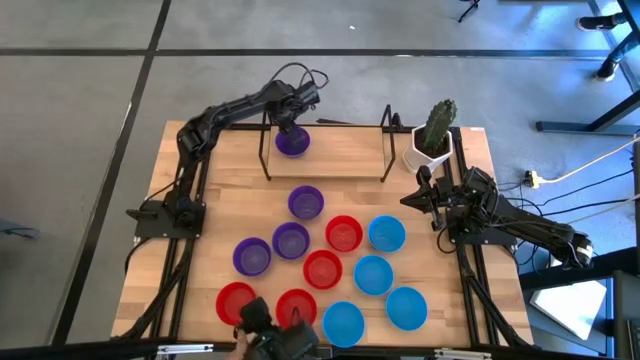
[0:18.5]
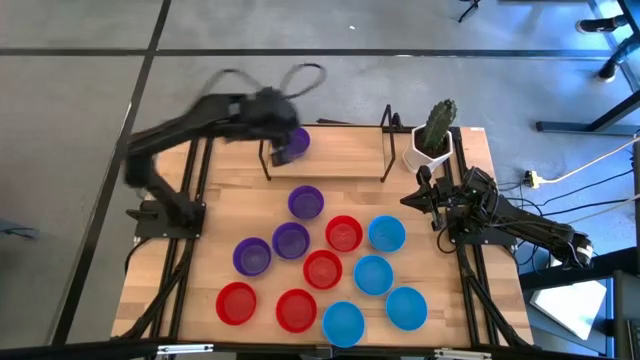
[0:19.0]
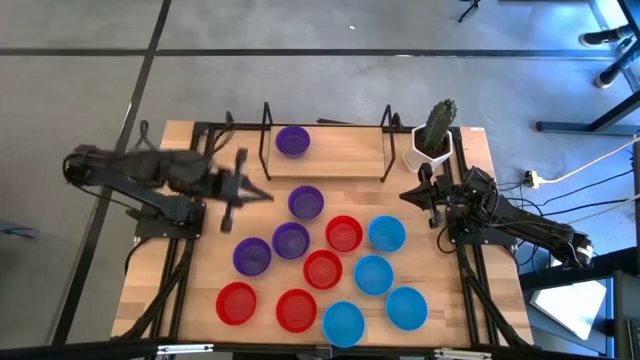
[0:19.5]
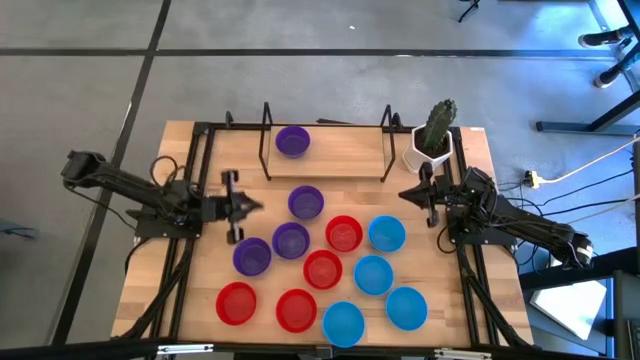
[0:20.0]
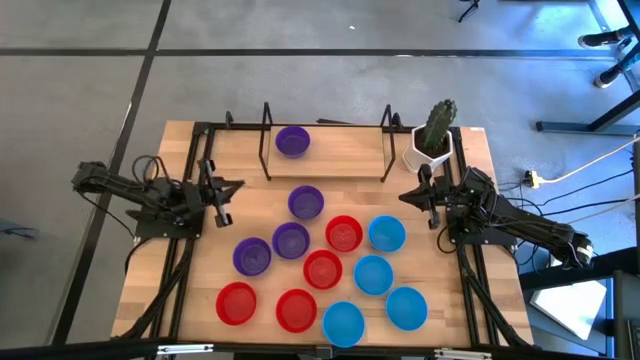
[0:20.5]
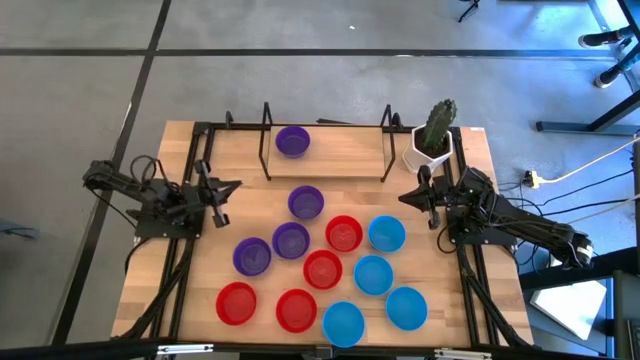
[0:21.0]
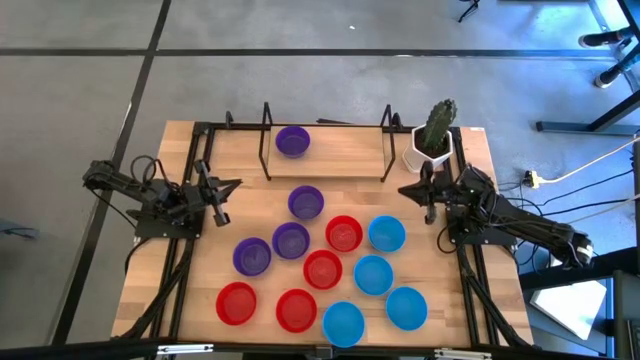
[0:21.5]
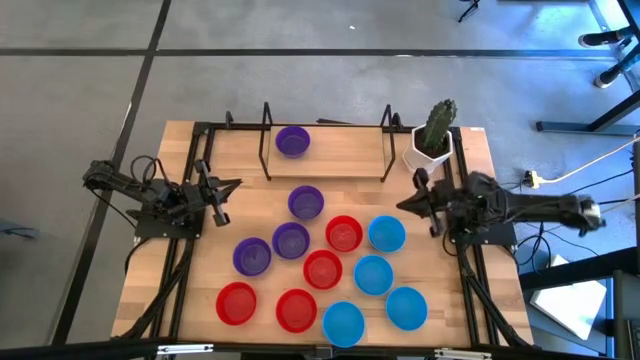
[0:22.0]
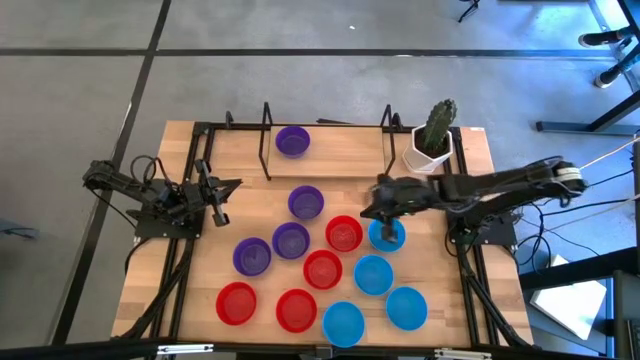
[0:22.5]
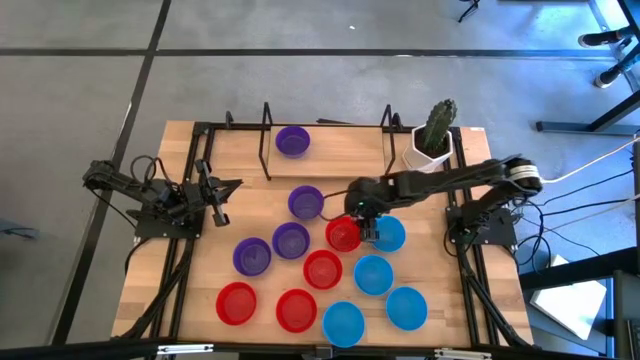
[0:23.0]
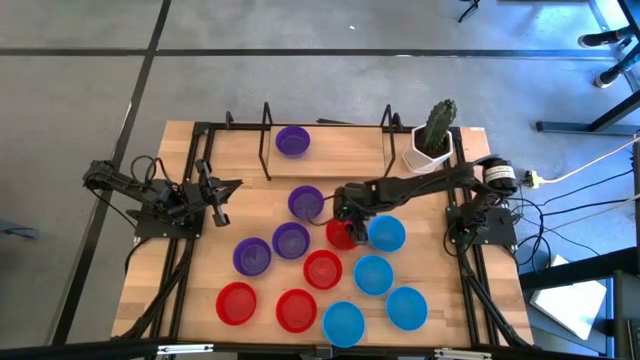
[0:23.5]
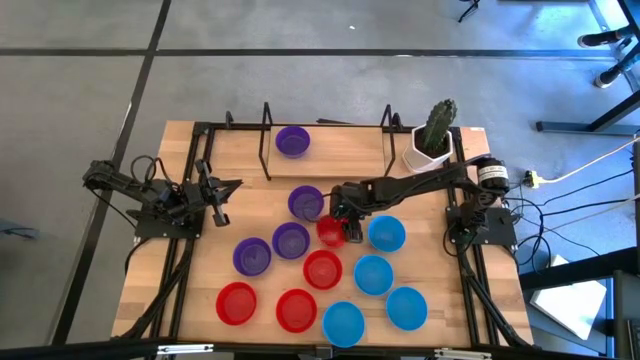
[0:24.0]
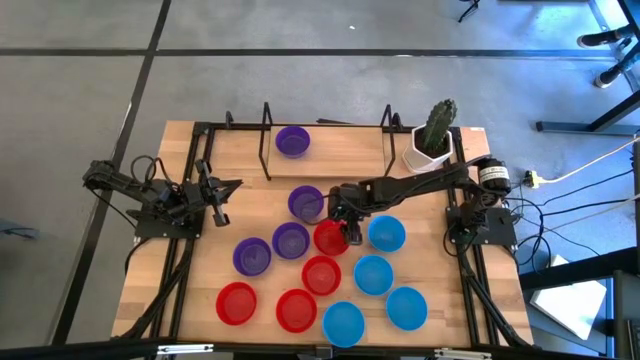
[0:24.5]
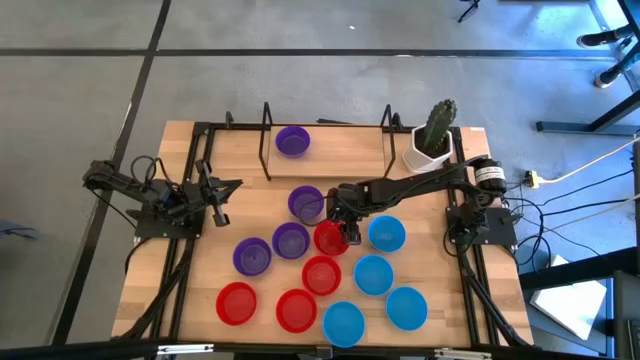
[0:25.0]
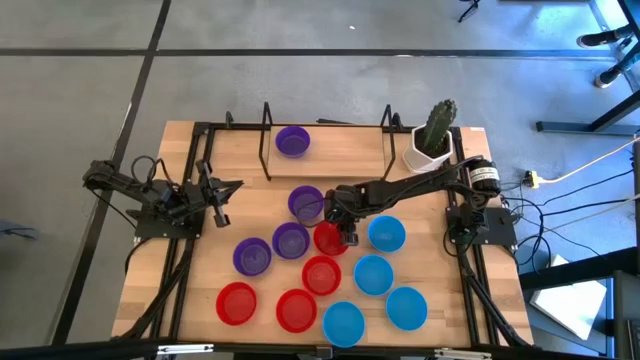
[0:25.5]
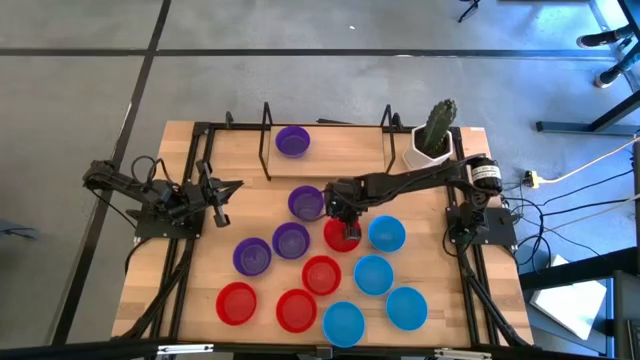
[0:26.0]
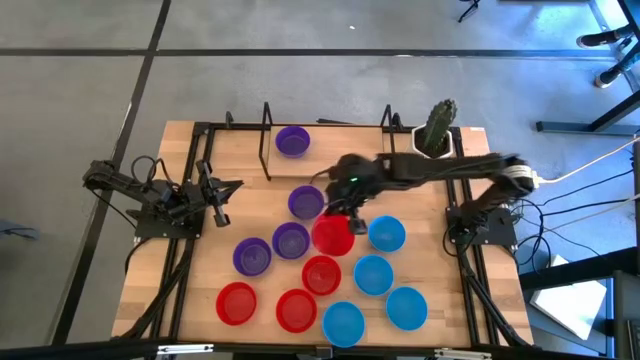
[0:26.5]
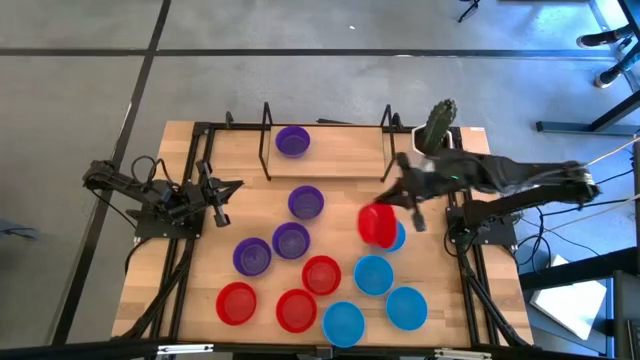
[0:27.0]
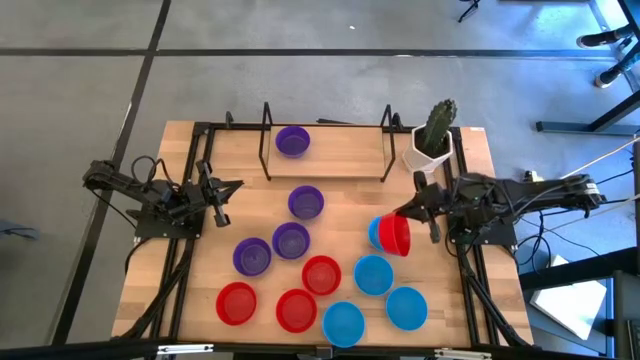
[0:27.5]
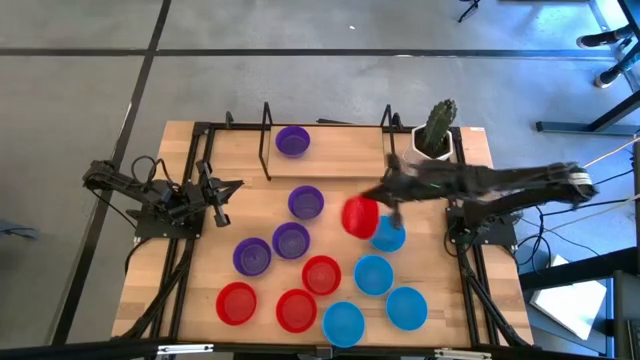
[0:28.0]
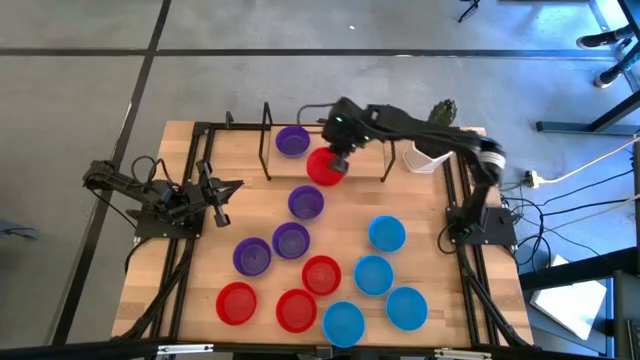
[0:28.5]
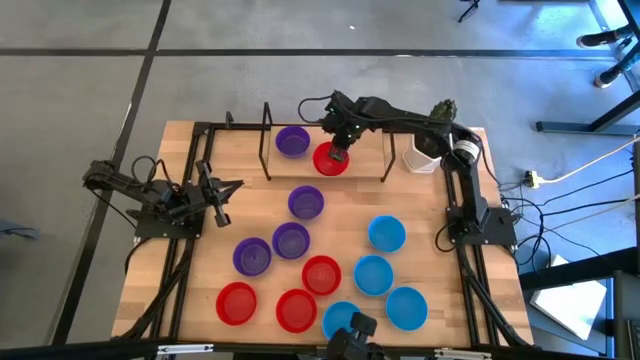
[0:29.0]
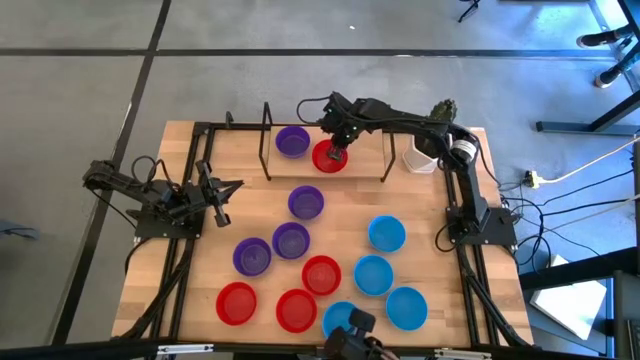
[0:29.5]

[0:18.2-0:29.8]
Task: Pick & Place Mini bowls
Put the red bowl on the shelf

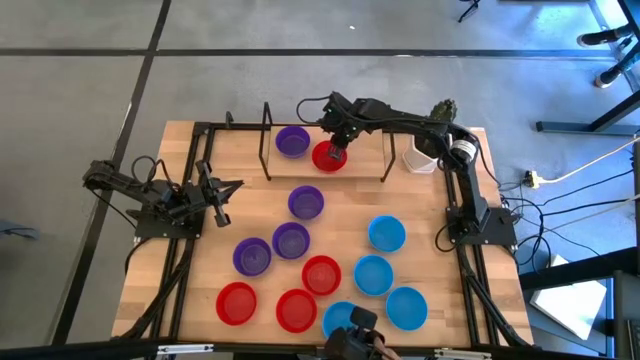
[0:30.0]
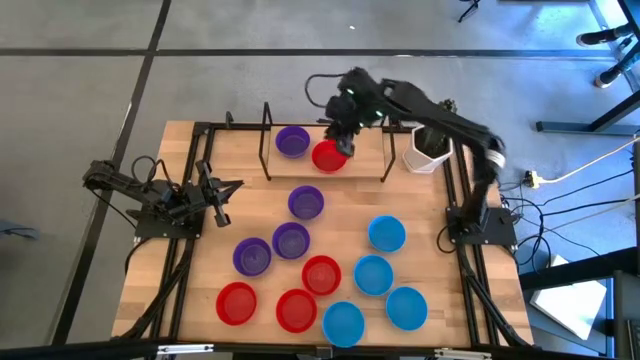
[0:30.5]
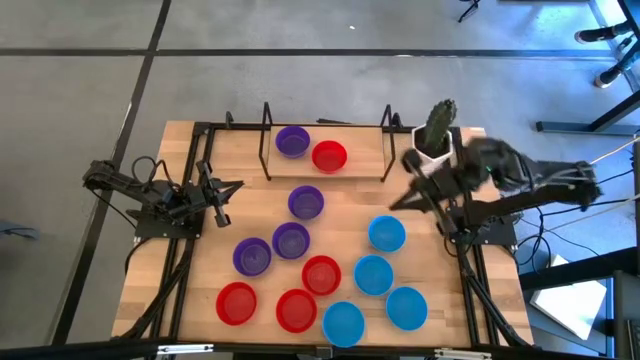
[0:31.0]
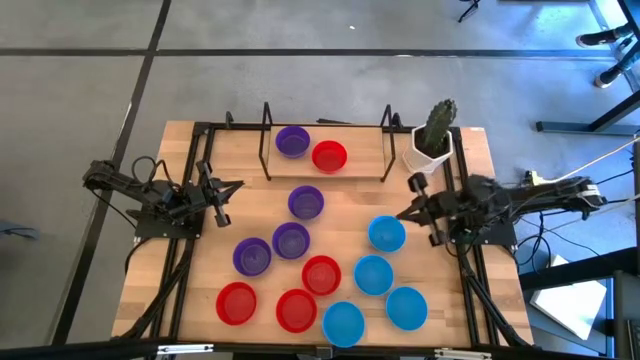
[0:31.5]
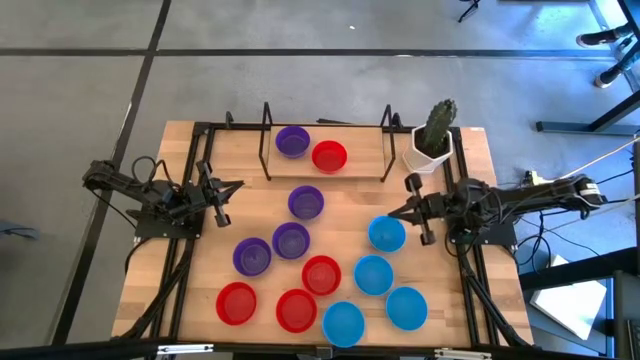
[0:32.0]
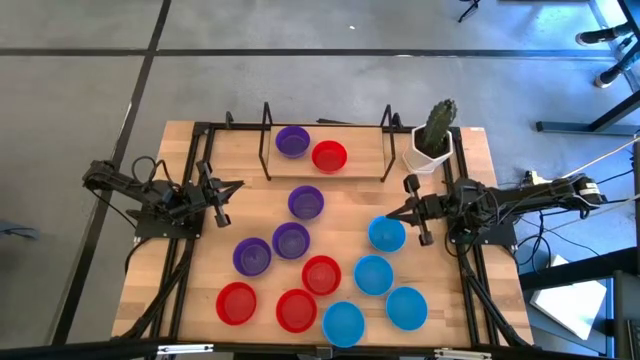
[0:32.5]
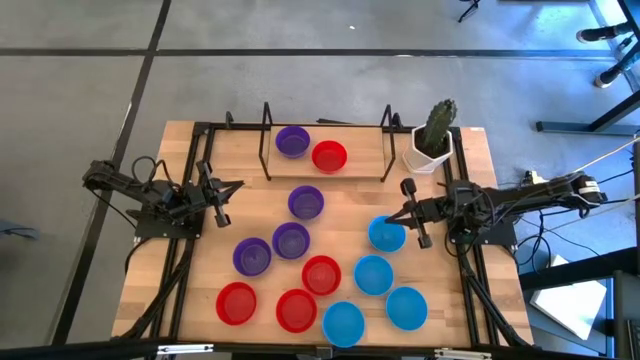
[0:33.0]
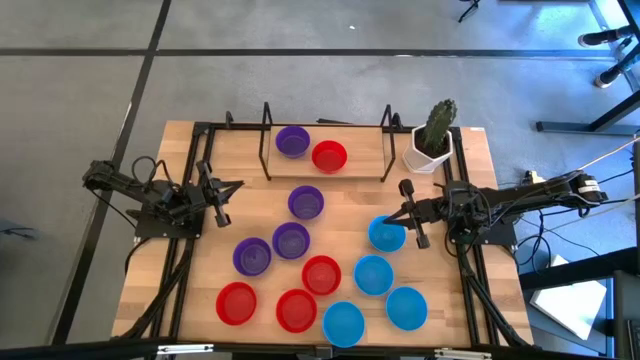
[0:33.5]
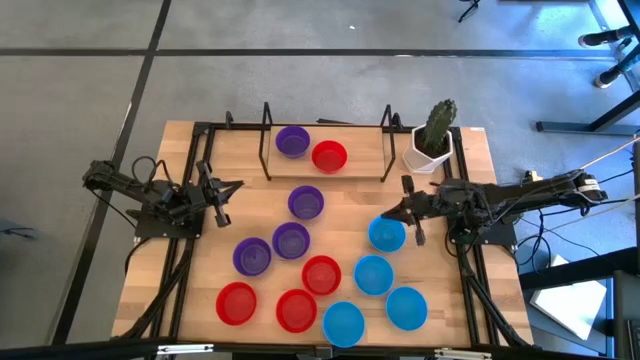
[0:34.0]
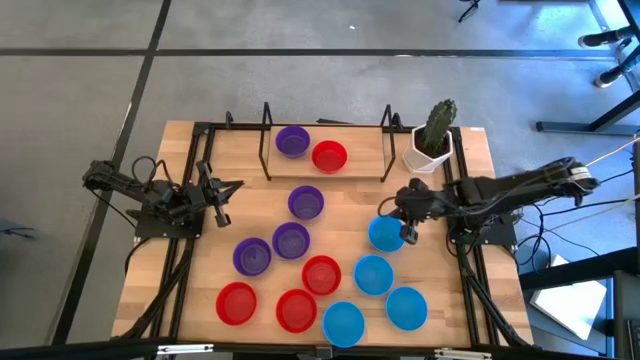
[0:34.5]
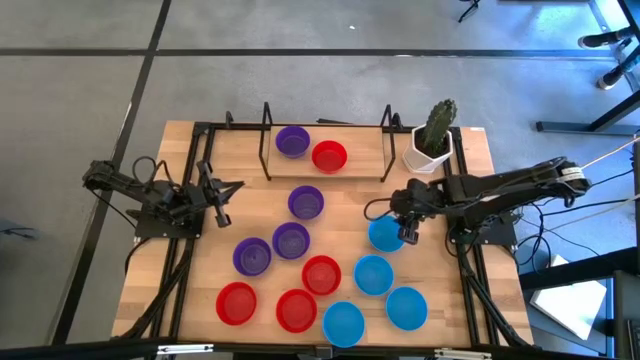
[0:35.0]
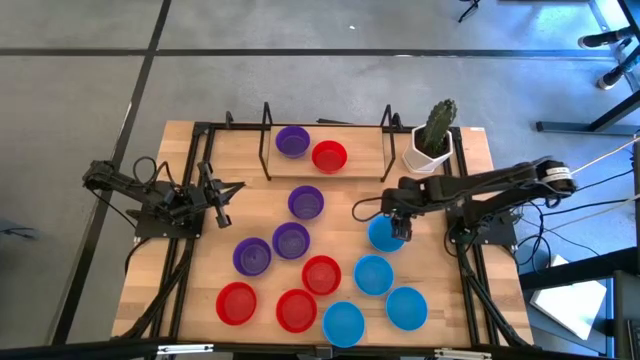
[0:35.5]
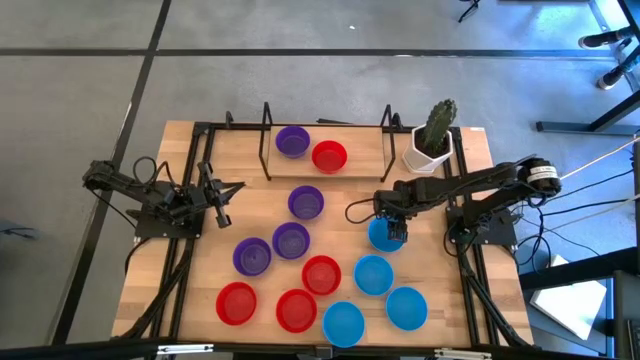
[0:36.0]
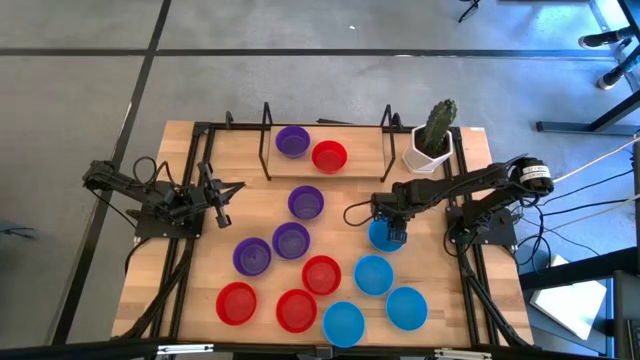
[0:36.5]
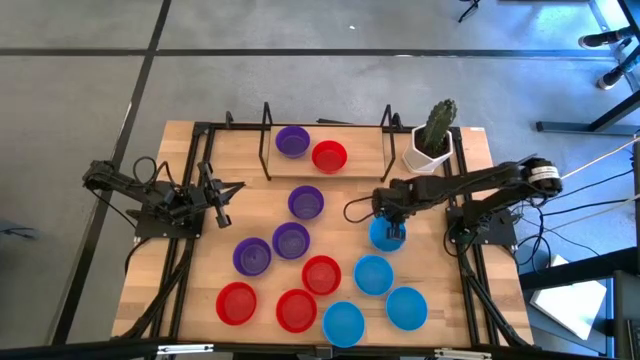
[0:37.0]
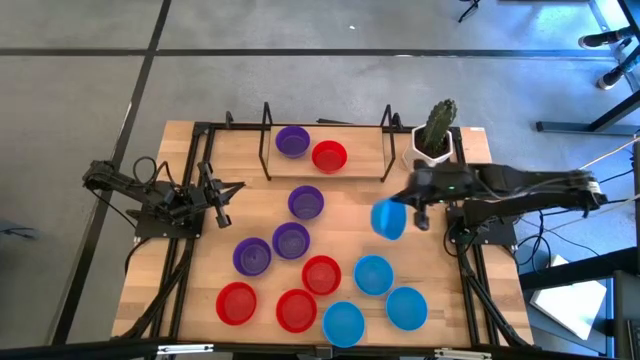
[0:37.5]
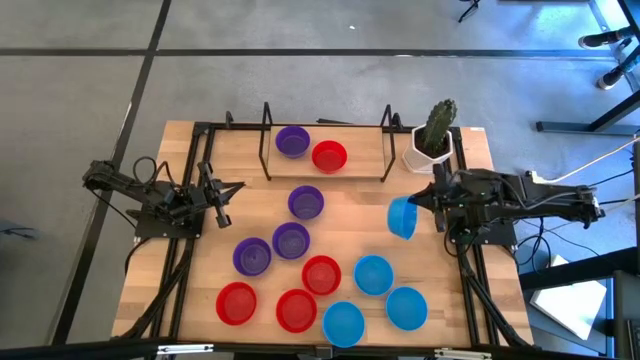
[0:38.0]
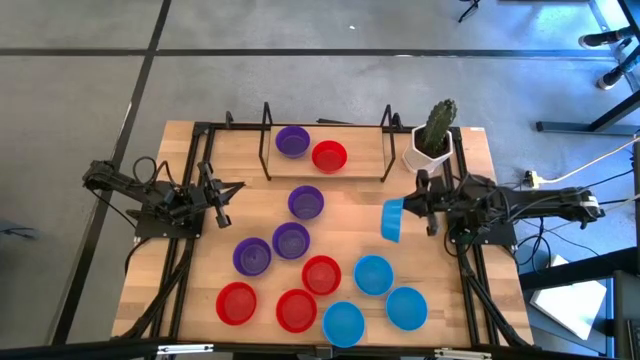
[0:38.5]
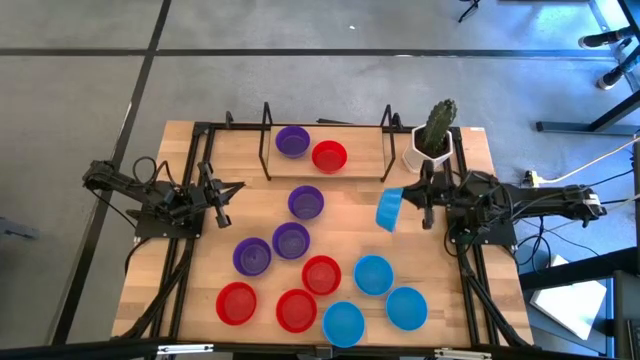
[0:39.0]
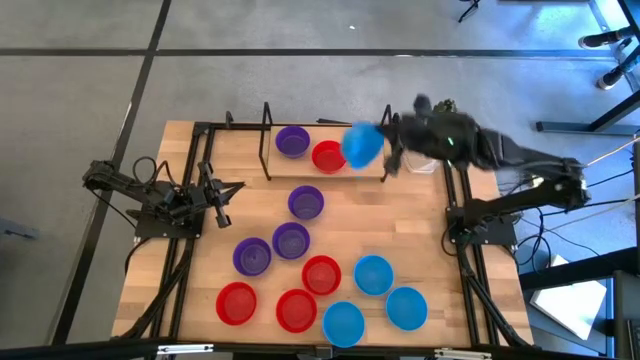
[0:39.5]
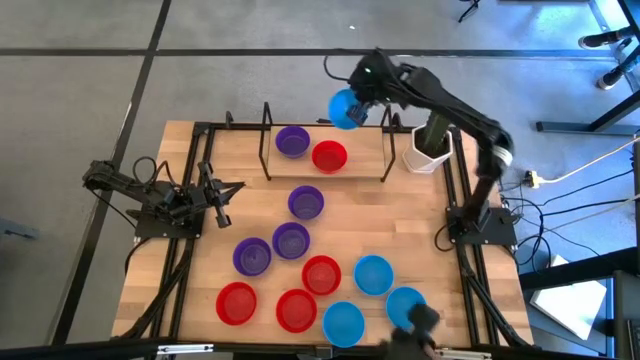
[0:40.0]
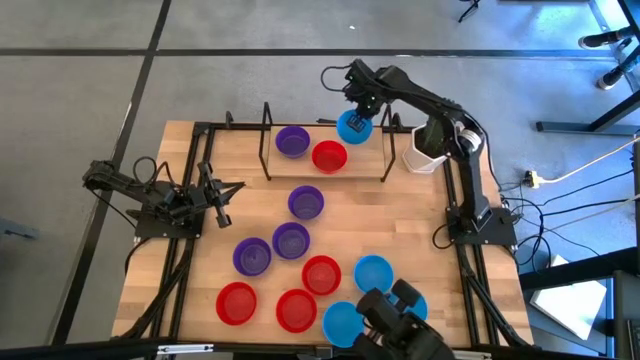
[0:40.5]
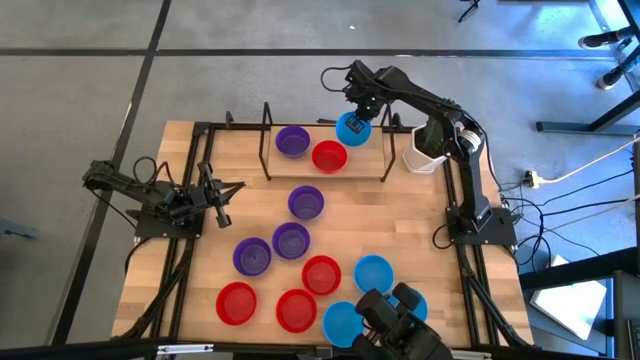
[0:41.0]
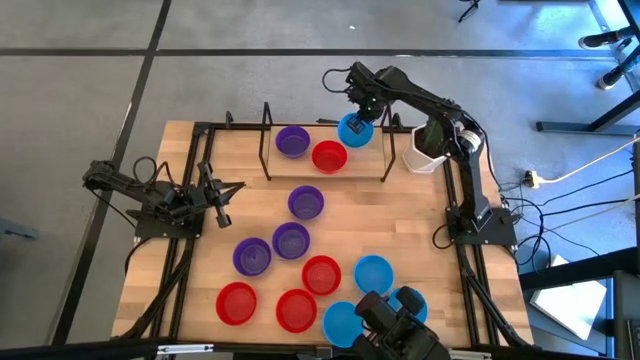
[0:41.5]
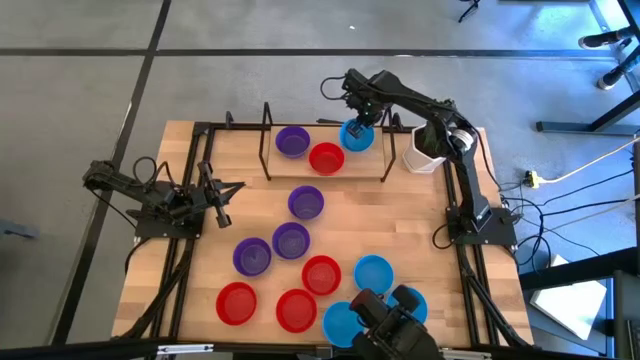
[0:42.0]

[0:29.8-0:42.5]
Put the blue bowl on the shelf
